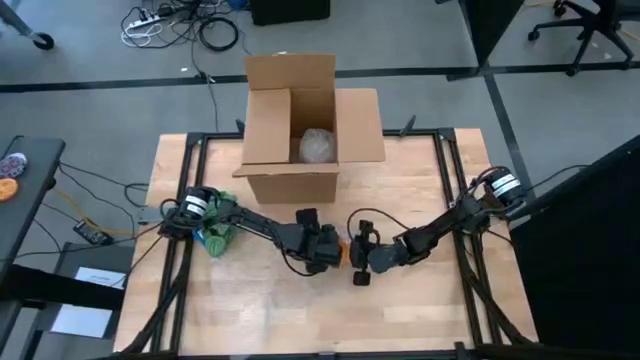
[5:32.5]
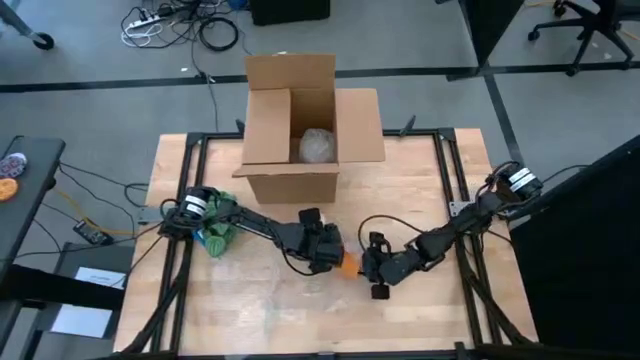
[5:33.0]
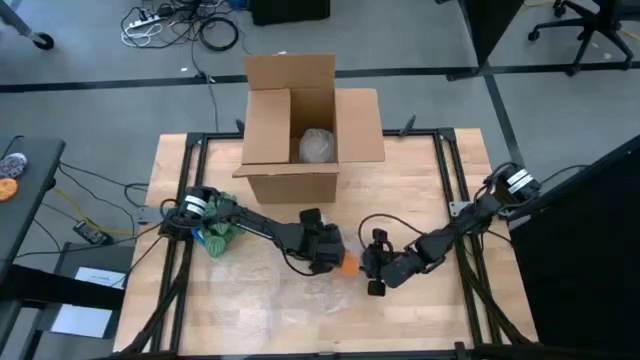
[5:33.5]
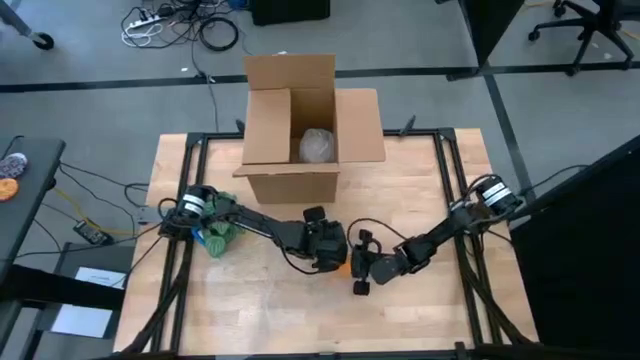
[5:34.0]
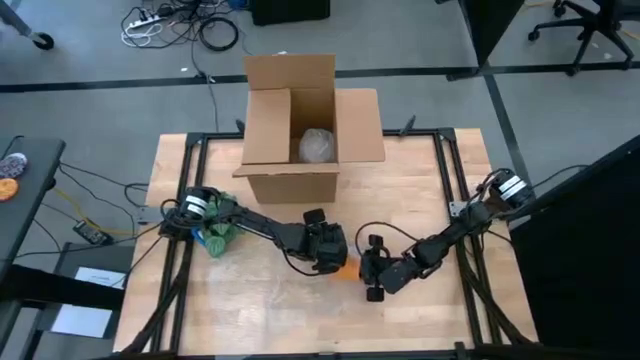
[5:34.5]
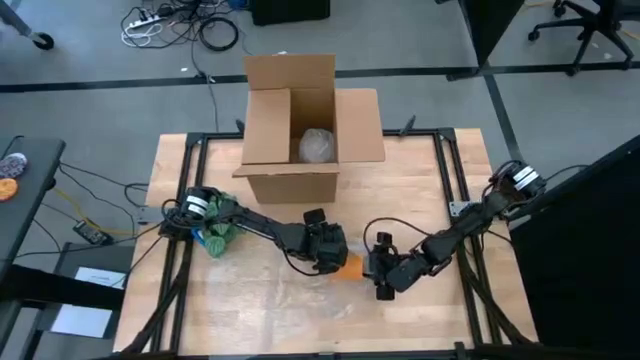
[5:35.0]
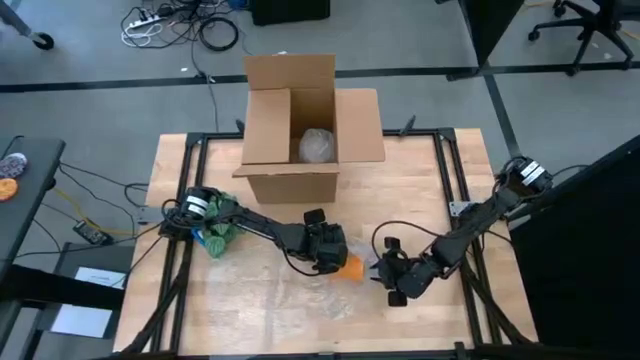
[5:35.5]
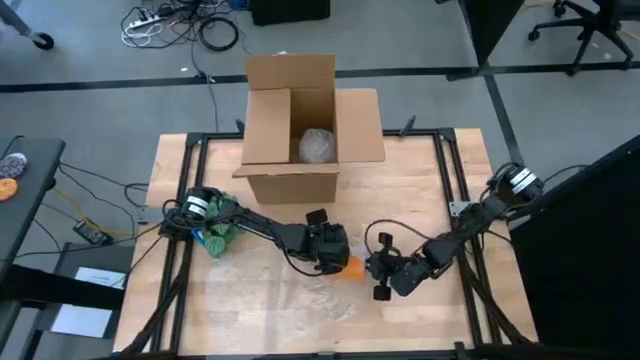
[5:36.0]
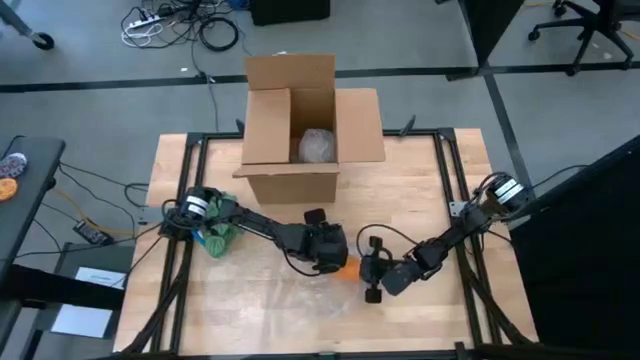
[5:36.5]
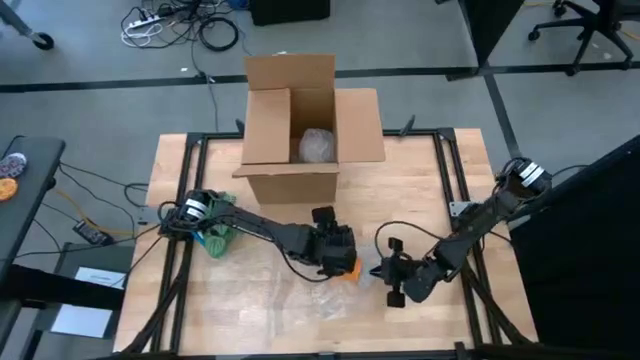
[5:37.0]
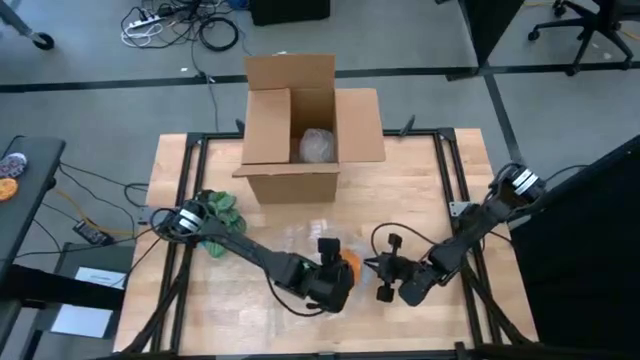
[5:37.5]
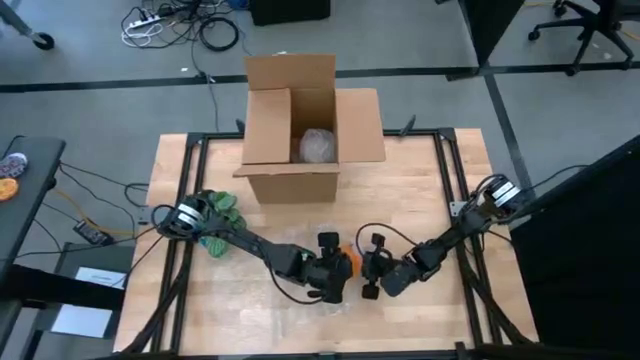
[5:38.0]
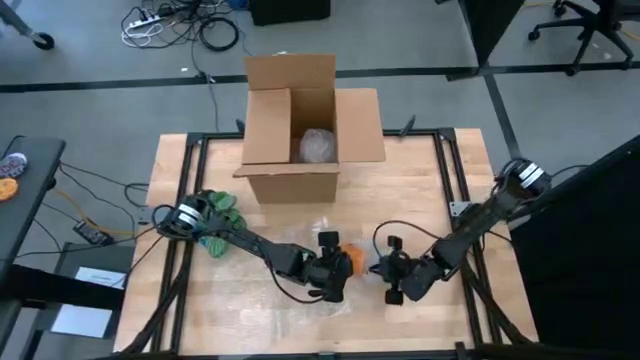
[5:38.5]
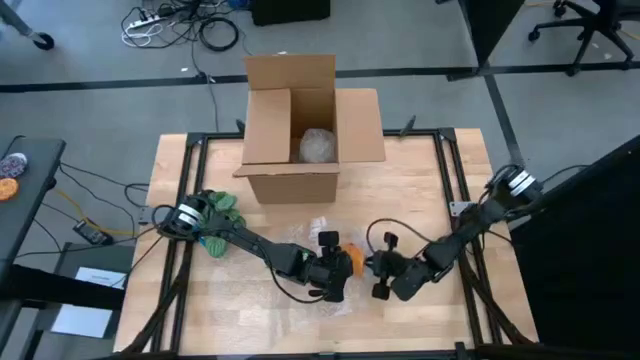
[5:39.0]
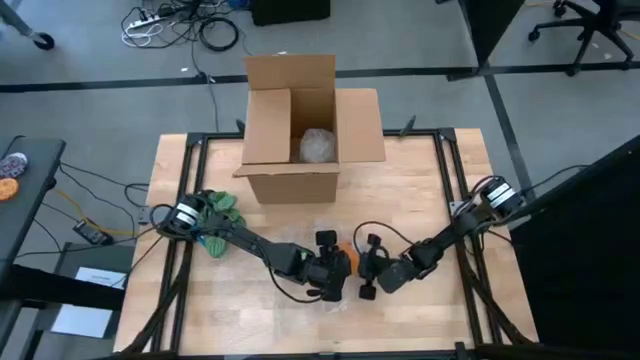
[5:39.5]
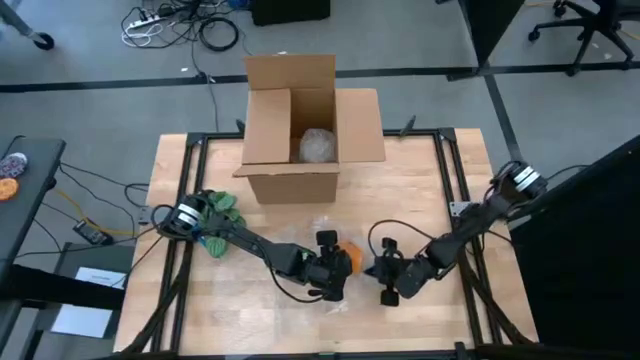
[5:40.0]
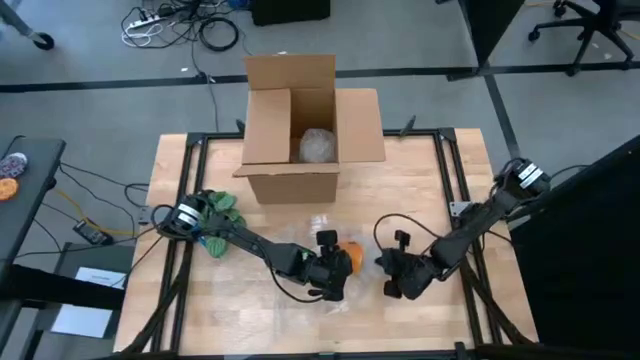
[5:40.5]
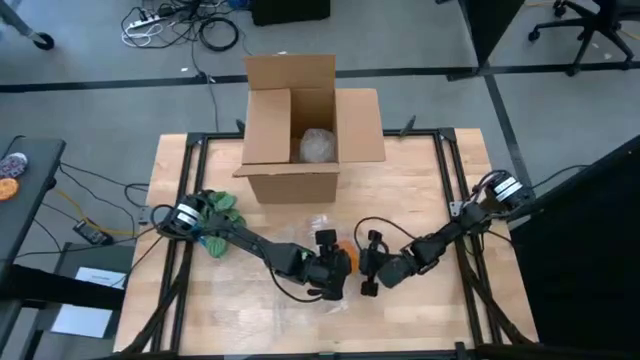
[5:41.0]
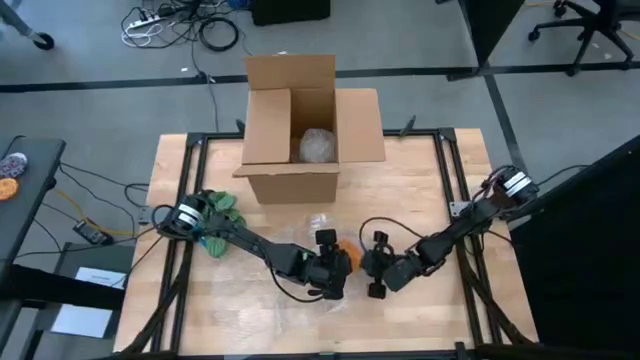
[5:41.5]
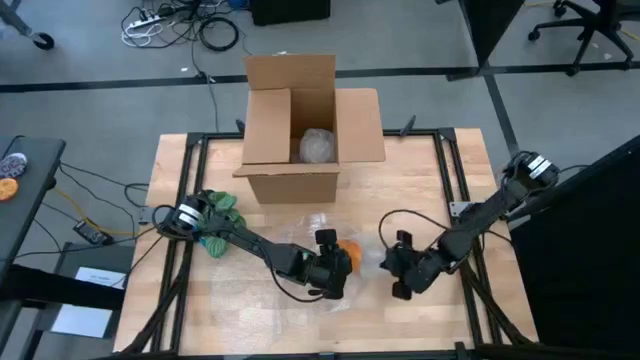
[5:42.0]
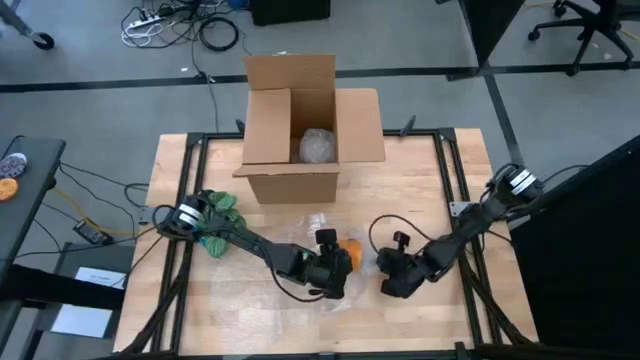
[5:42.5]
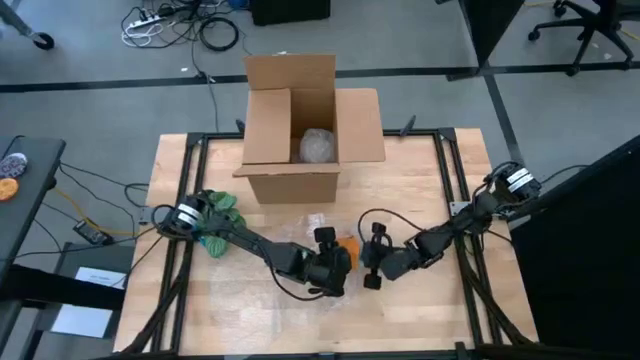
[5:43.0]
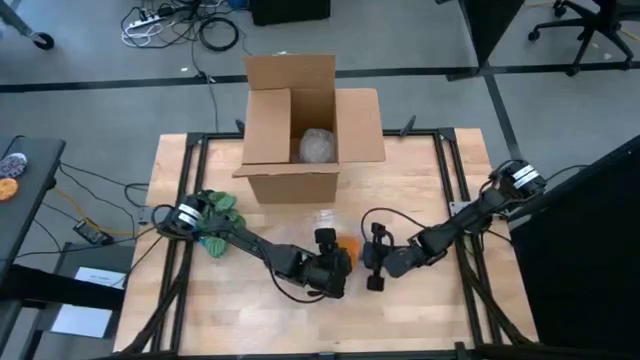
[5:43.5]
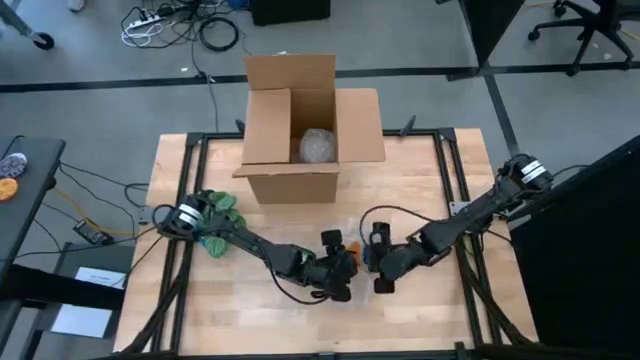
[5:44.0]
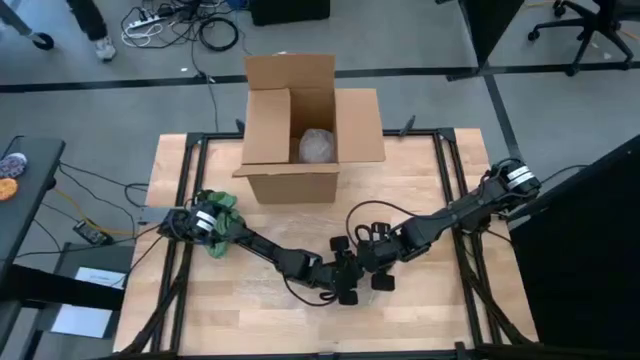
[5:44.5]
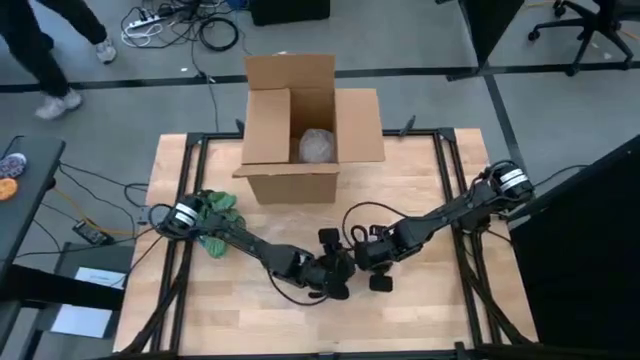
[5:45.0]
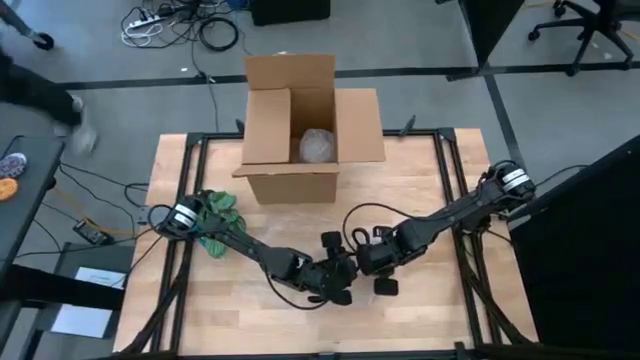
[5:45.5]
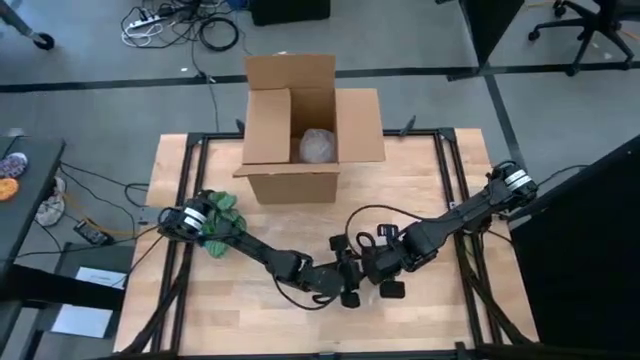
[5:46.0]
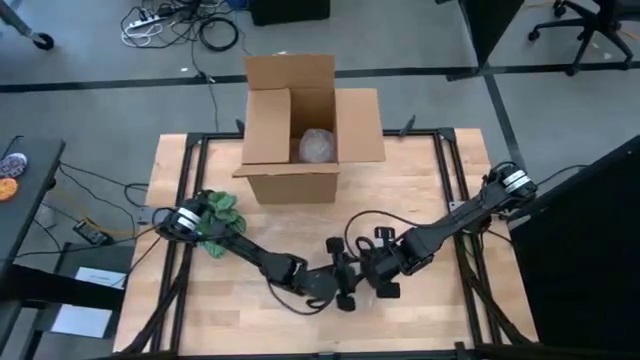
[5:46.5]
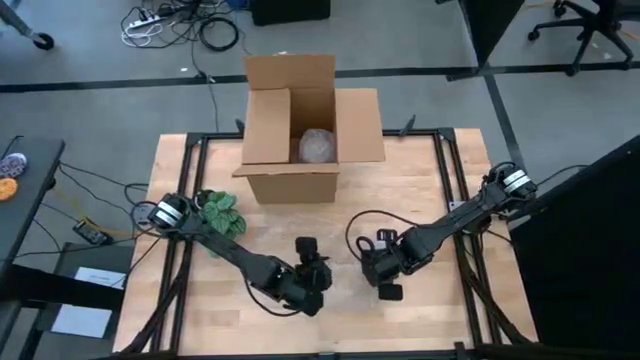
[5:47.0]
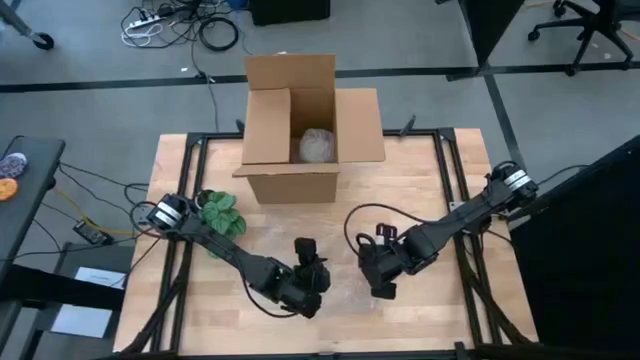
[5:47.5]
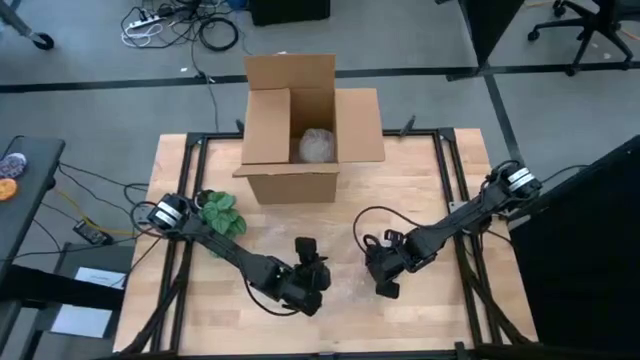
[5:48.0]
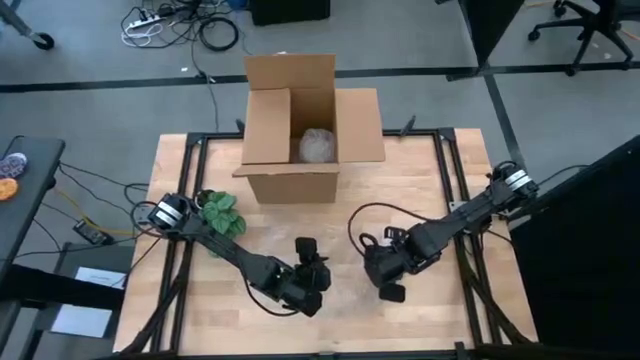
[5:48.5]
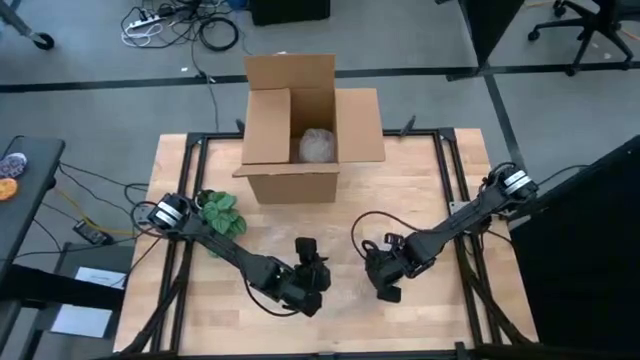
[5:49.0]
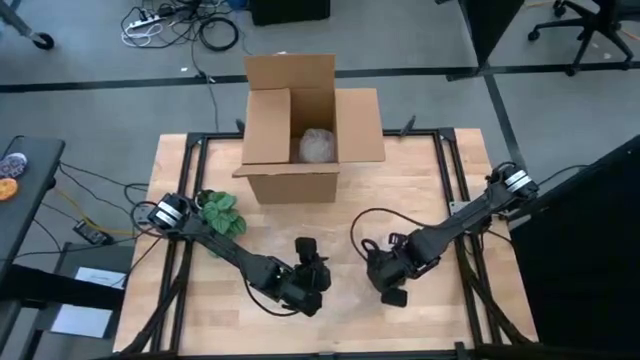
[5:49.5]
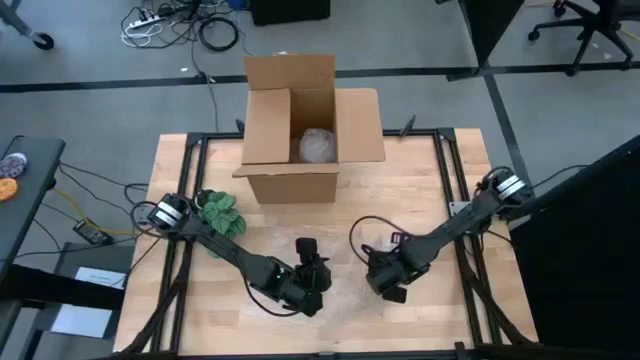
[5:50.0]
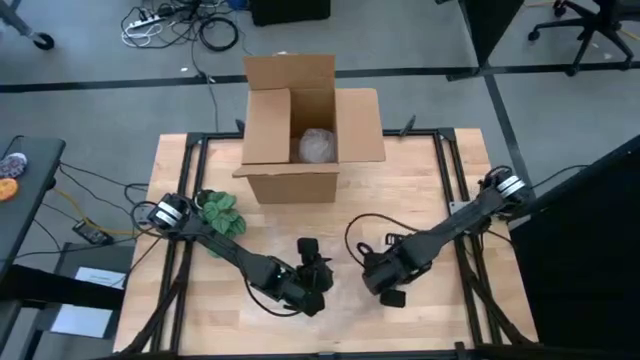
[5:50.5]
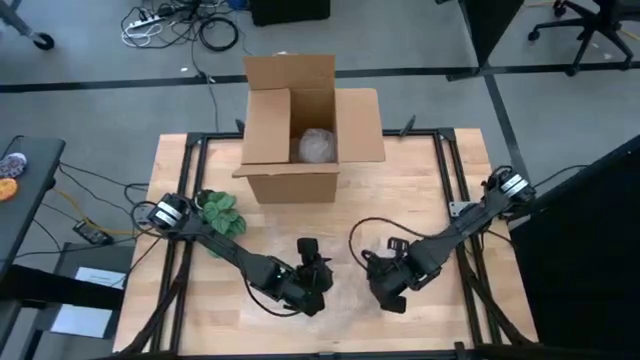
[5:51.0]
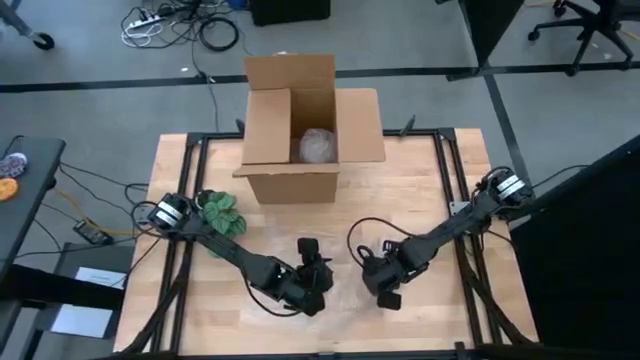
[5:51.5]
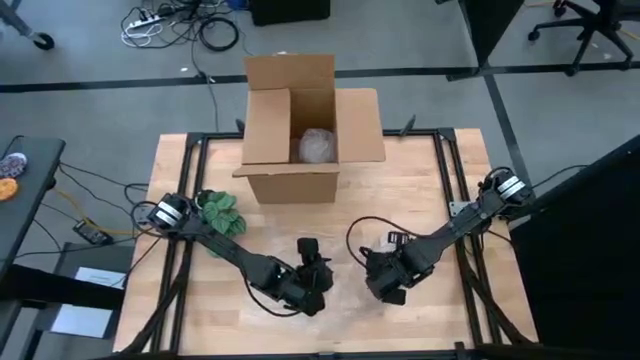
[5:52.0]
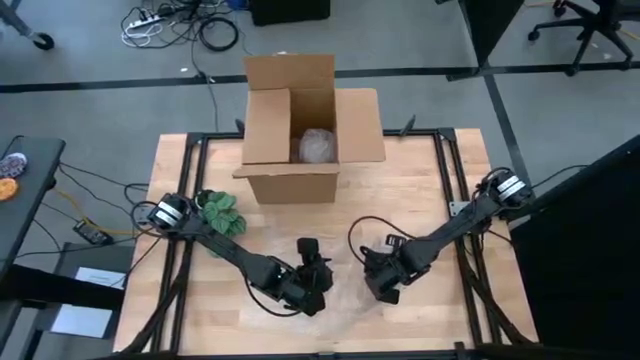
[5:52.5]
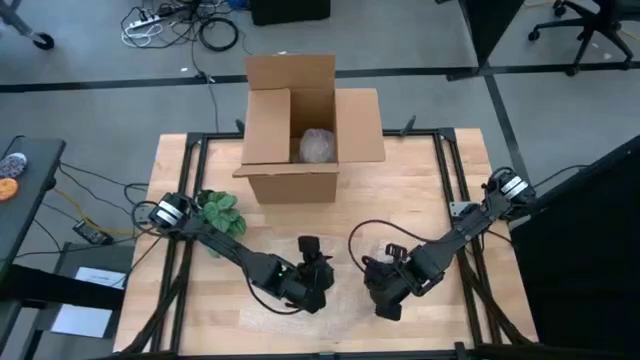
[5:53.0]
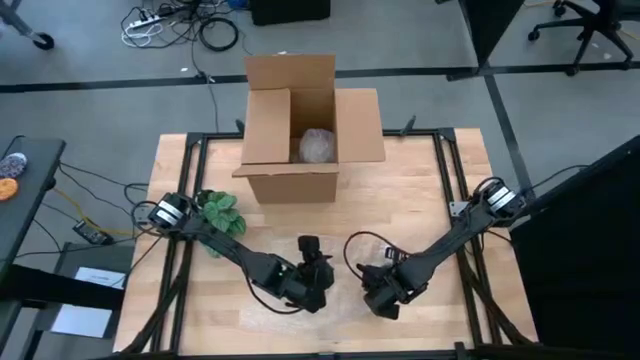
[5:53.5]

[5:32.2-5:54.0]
Task: wrap mug
Wrap the orange mug with the bubble wrap
